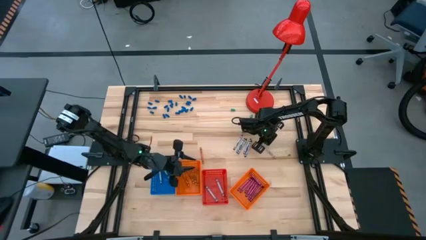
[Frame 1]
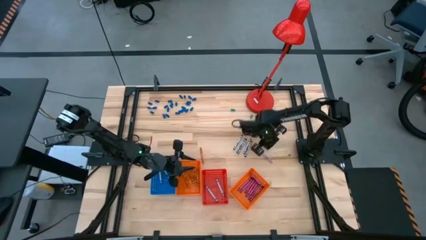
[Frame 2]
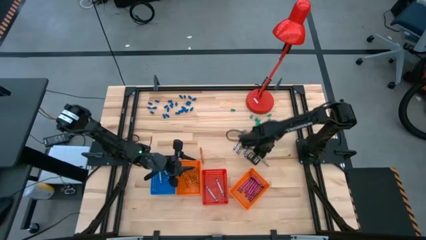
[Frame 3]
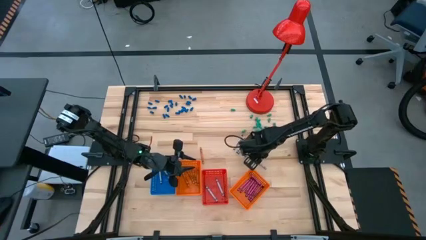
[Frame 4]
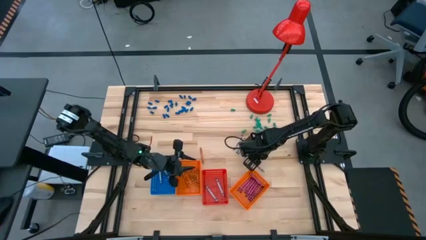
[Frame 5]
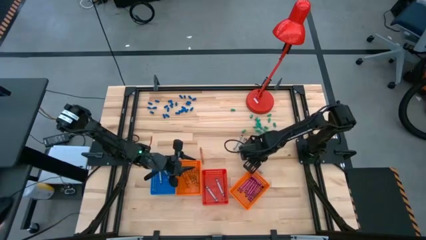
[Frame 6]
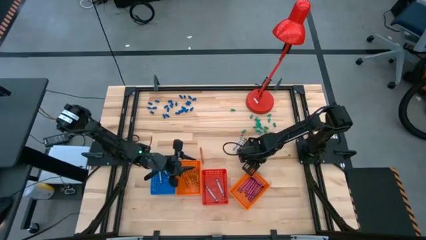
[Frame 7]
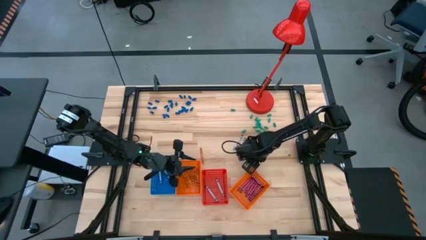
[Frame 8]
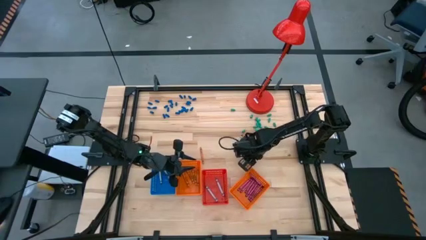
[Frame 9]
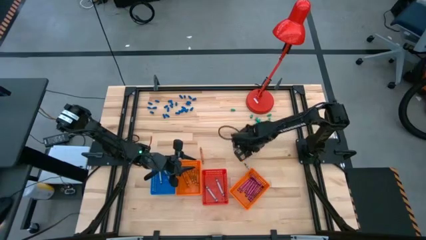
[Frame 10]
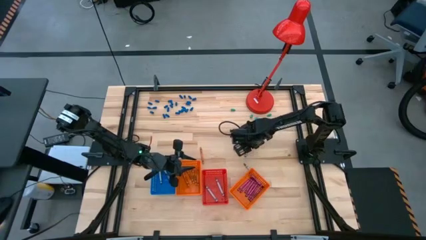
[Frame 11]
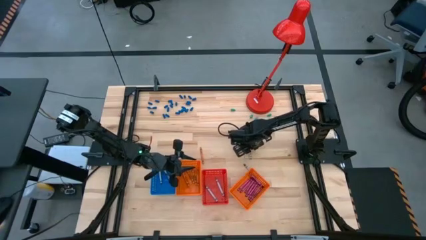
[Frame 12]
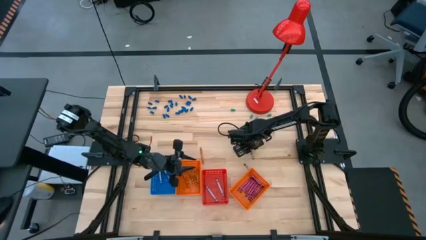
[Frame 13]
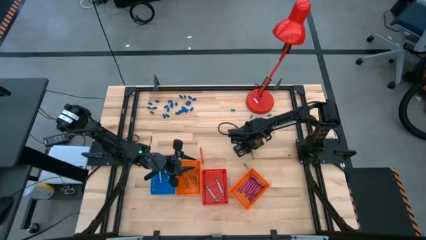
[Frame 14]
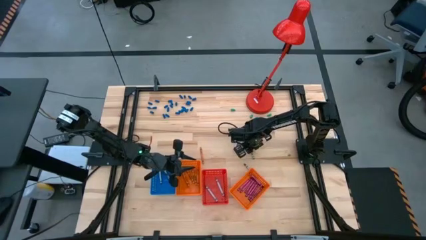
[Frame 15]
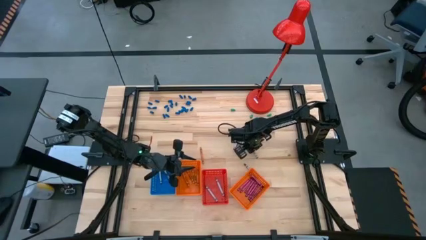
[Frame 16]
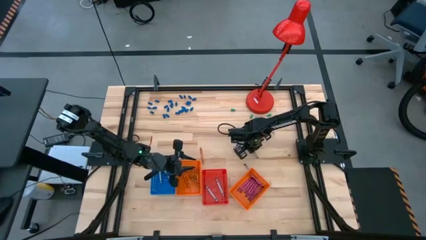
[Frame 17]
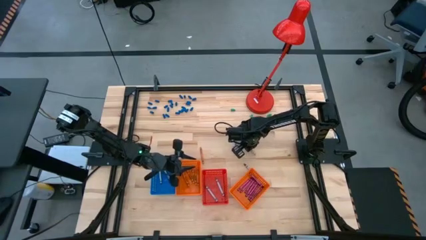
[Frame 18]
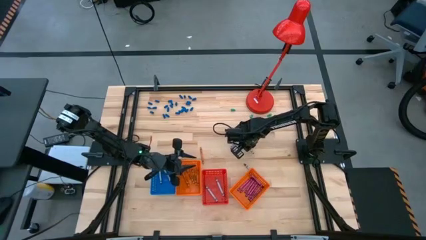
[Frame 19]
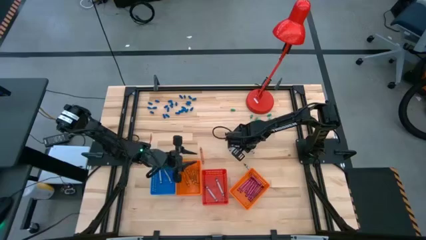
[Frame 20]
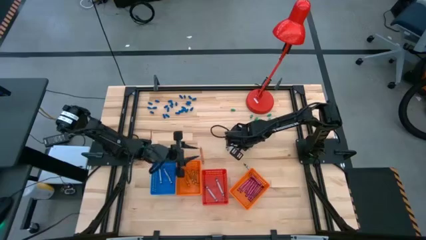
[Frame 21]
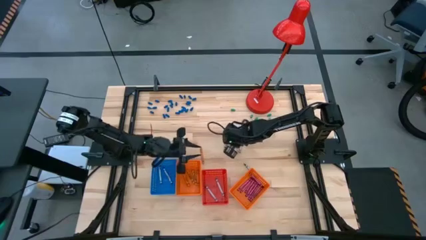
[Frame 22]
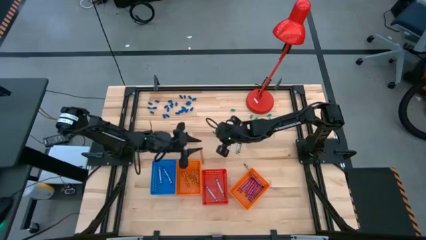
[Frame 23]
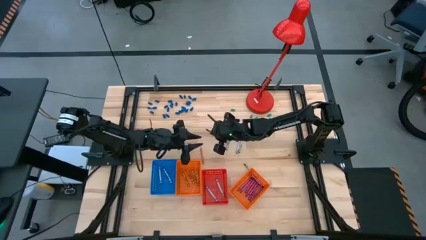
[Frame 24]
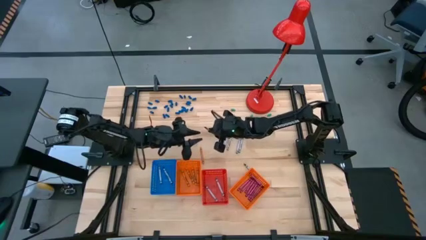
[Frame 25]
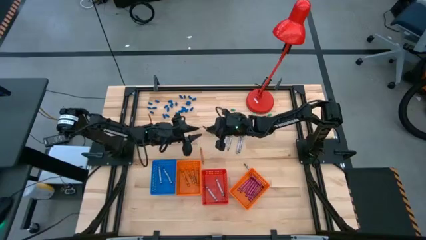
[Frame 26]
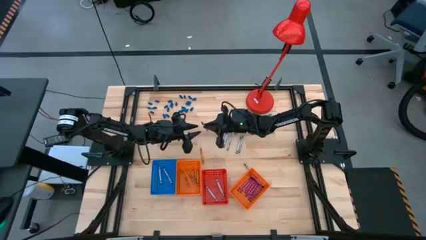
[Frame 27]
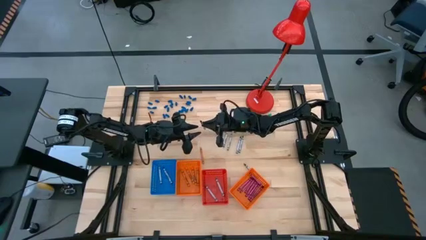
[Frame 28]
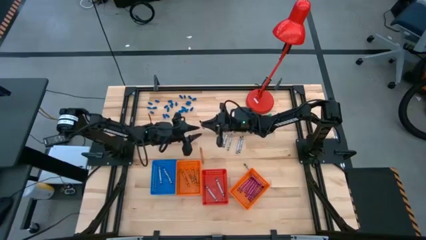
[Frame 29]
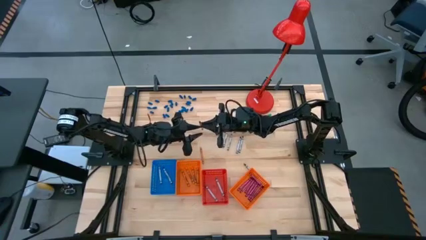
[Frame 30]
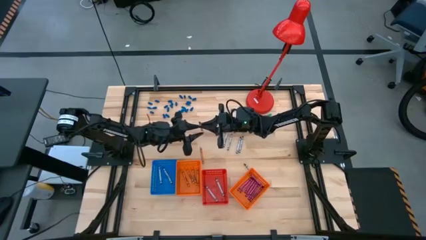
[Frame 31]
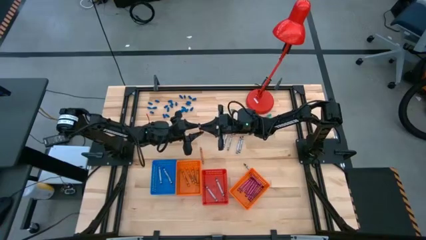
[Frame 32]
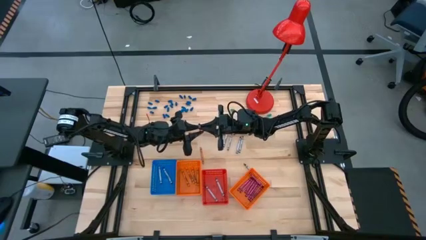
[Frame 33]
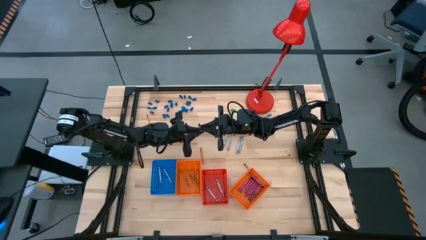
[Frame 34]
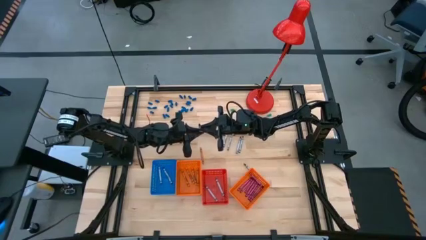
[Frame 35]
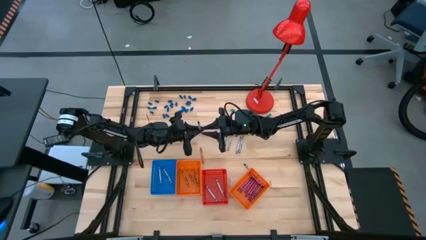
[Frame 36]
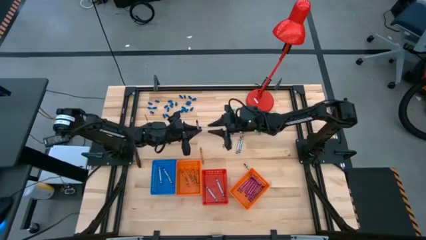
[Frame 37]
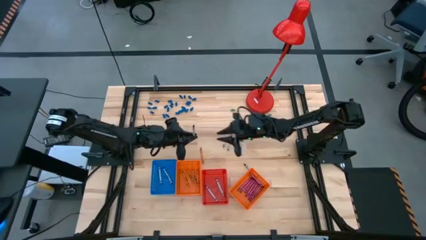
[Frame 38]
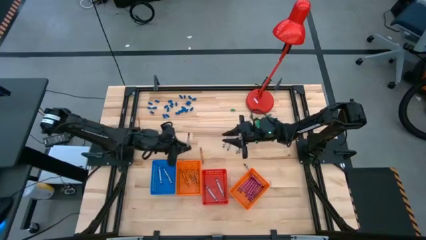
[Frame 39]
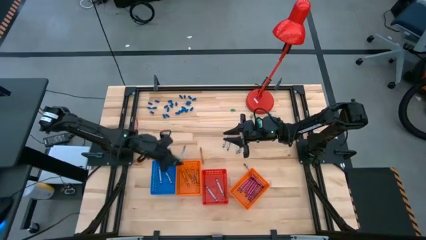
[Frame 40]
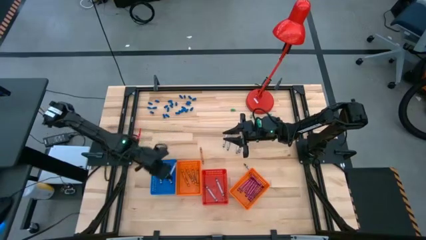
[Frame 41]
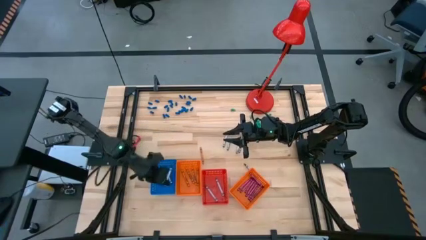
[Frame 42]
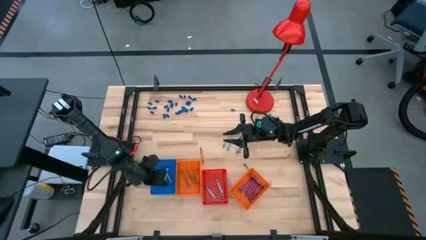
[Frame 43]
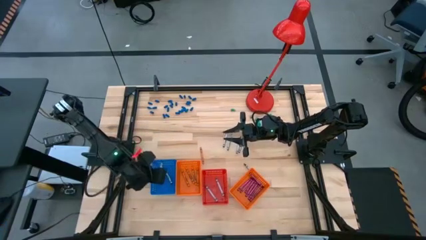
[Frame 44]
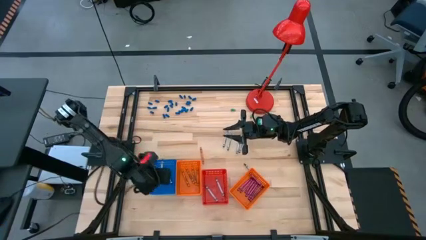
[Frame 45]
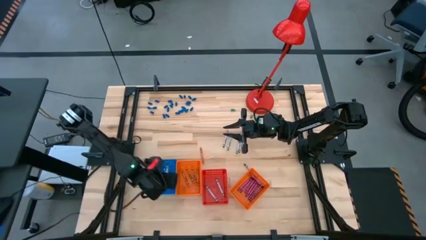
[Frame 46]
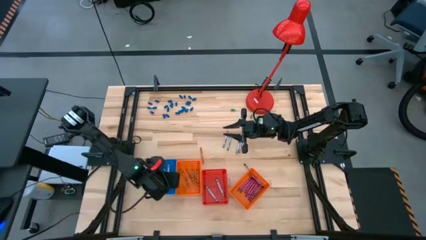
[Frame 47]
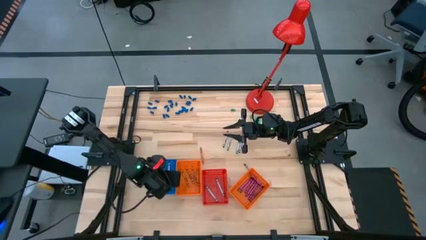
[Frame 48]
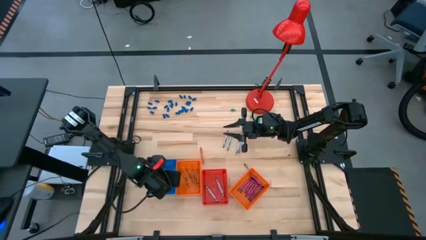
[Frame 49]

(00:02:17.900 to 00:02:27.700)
Task: Sort crayons
Put the black crayon into the blue bin

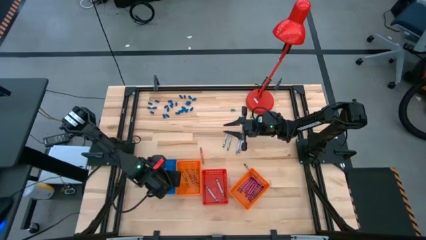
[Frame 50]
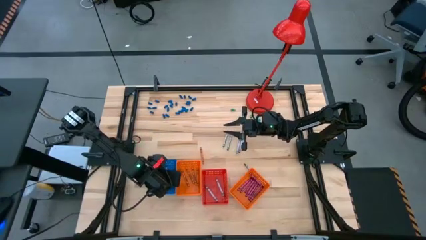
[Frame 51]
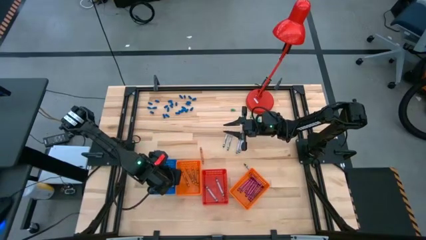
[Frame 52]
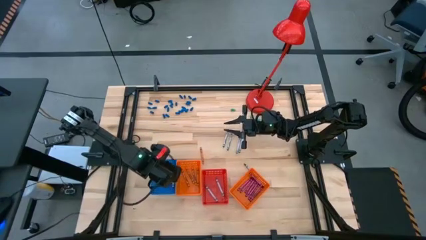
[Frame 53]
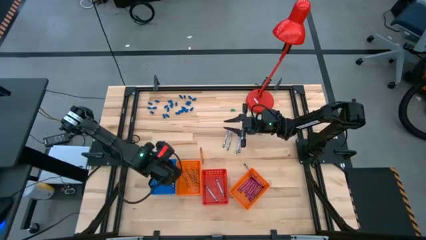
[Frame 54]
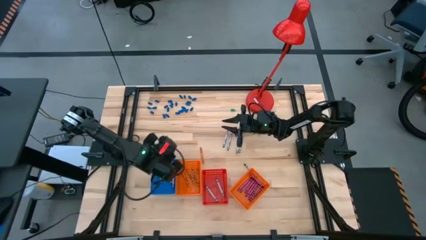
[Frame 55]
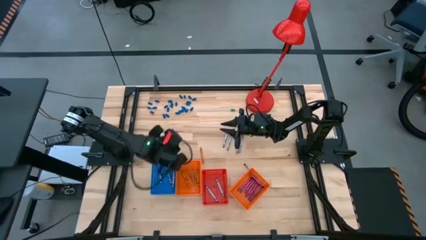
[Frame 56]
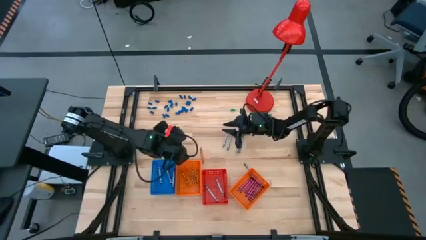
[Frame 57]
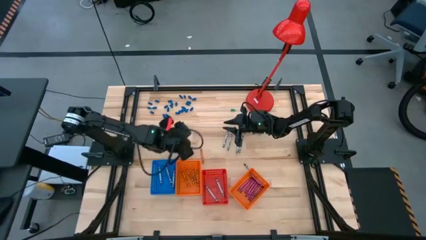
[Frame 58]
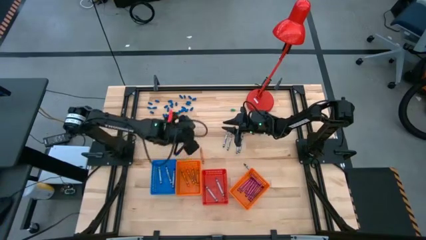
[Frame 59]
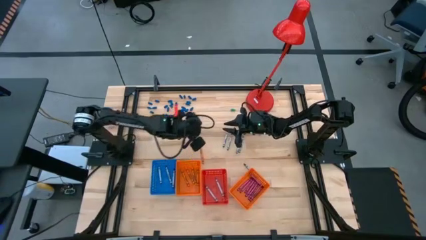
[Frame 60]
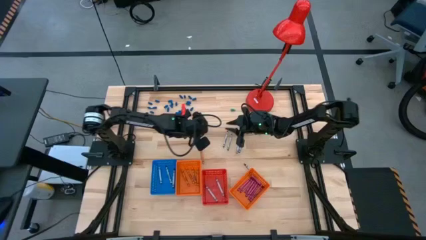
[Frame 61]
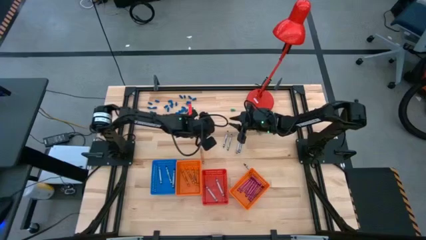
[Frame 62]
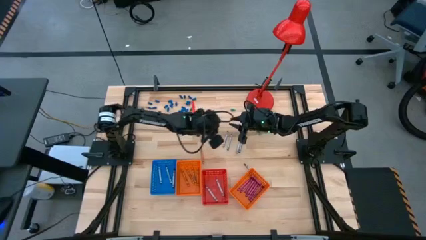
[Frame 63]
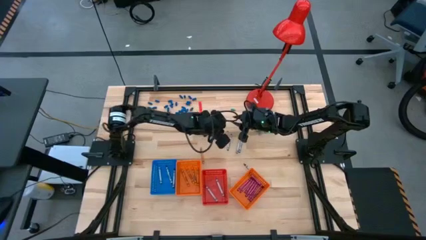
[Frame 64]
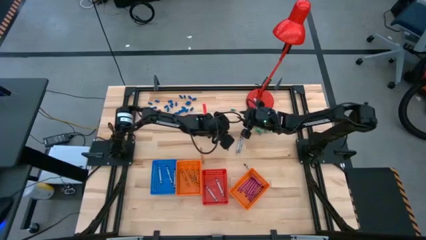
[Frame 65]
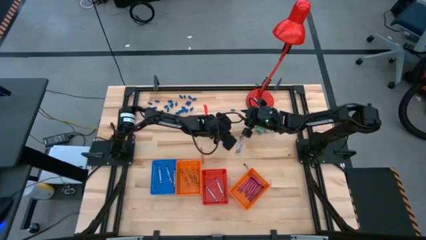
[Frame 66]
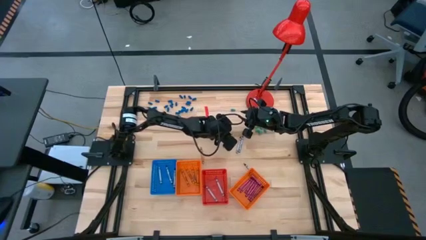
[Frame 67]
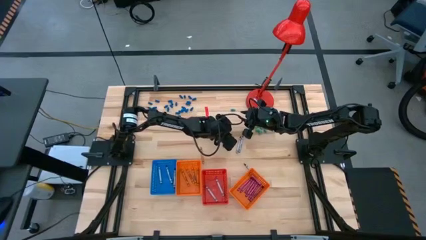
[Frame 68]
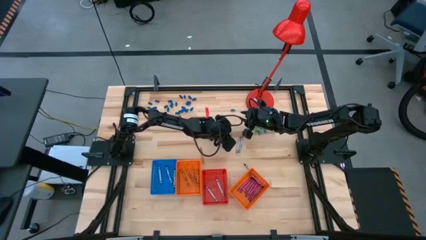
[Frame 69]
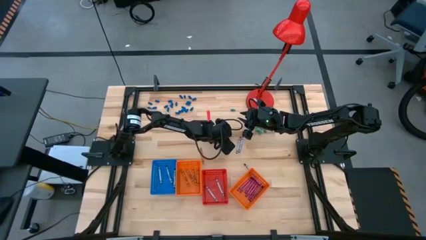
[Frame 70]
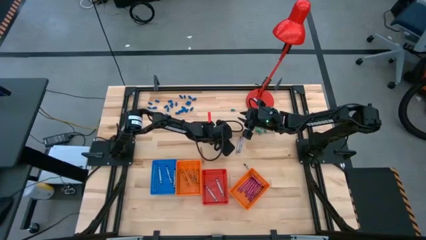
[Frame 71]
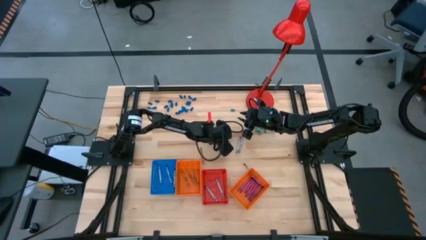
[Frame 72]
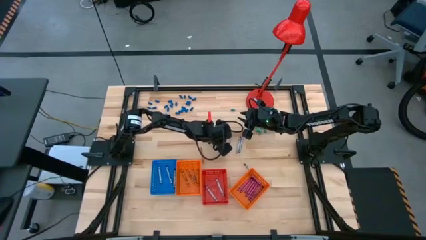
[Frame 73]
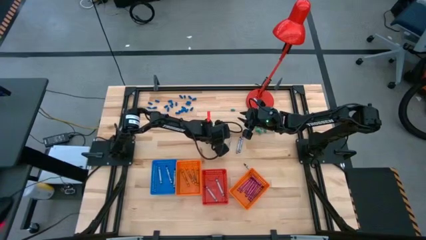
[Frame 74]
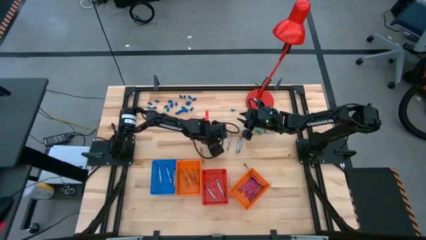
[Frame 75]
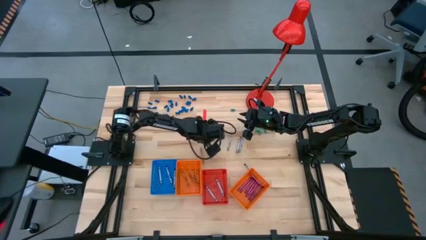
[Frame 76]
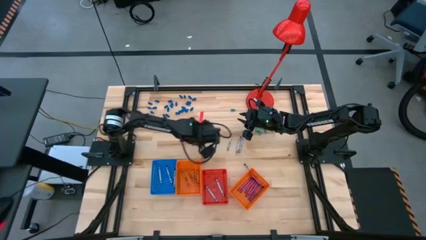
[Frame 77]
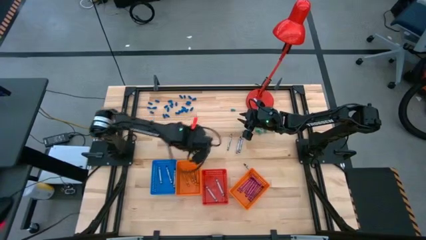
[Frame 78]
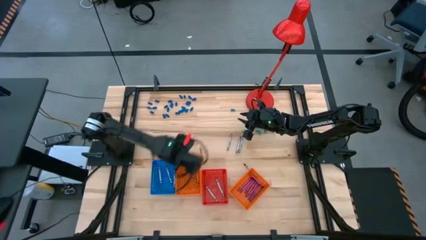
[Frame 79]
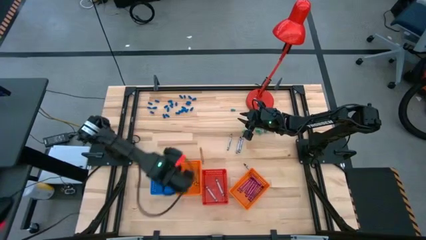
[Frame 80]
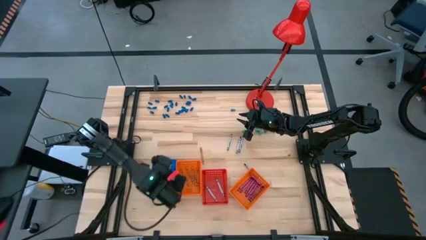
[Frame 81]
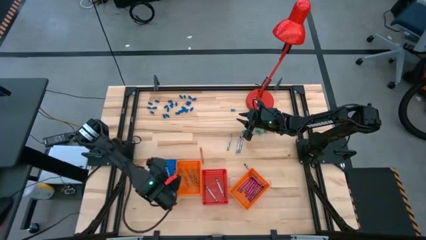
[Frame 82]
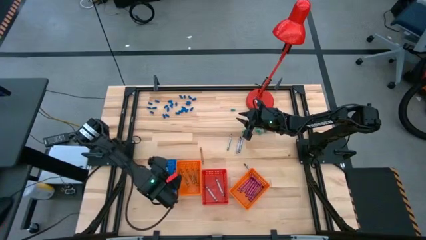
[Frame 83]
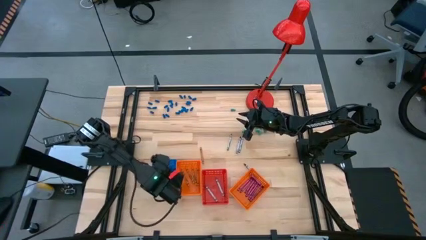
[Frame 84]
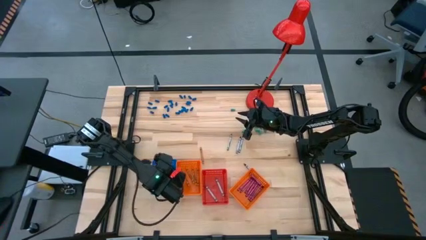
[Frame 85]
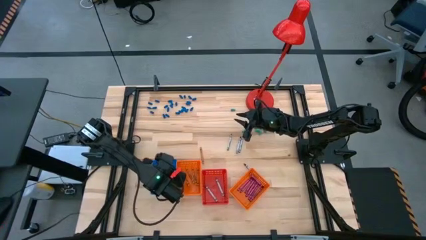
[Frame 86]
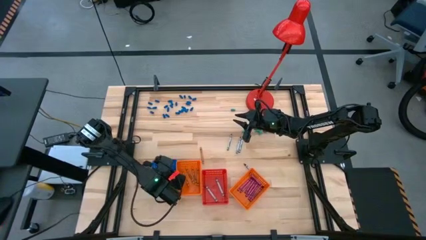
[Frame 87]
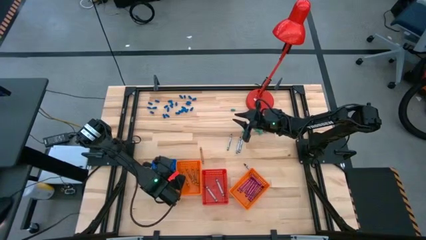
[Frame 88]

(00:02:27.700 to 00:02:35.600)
Put the black crayon into the blue bin

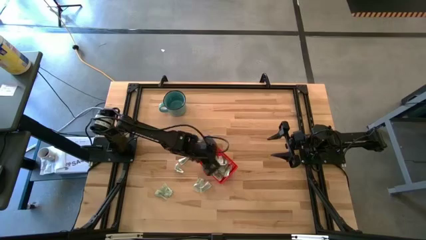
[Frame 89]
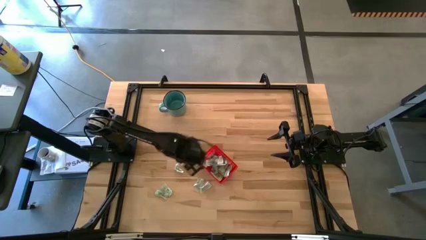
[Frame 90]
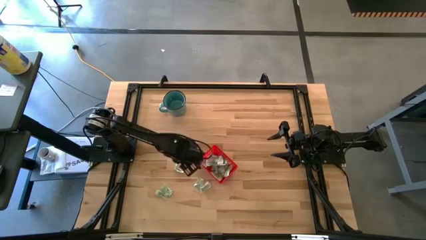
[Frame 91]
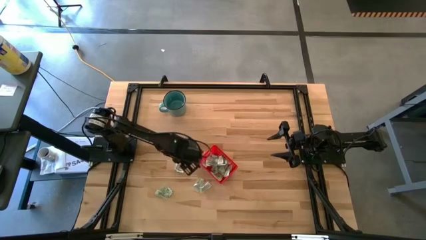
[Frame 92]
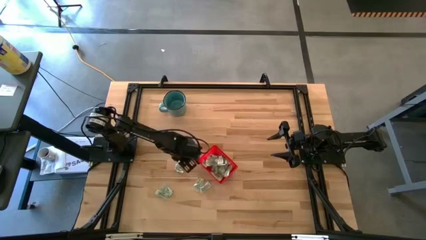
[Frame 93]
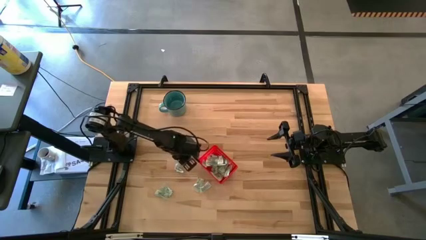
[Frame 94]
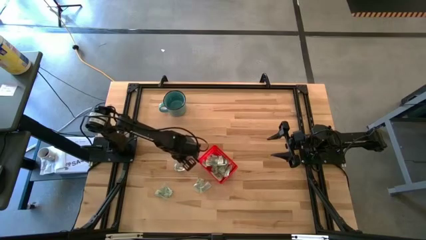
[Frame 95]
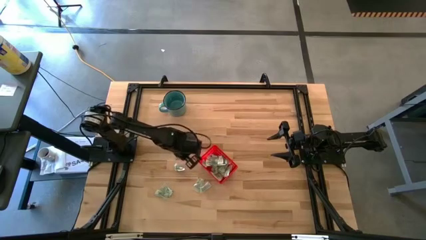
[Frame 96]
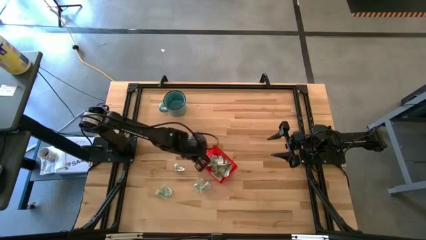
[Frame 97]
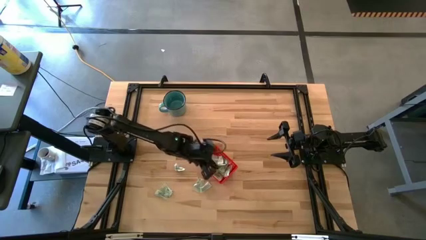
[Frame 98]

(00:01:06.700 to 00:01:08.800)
Task: Pick and place Stevia / Truvia into bins
Put the white stevia packet into the basket
